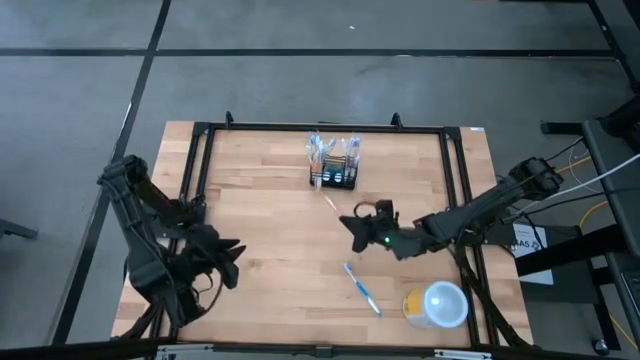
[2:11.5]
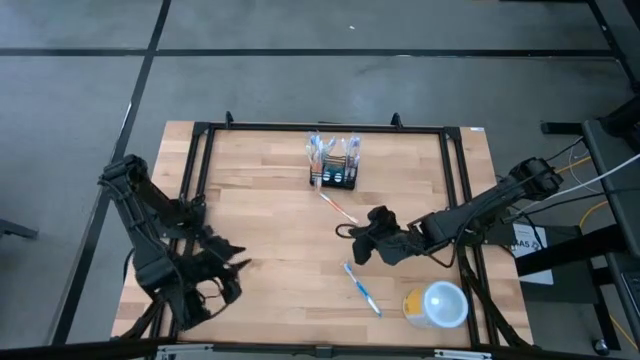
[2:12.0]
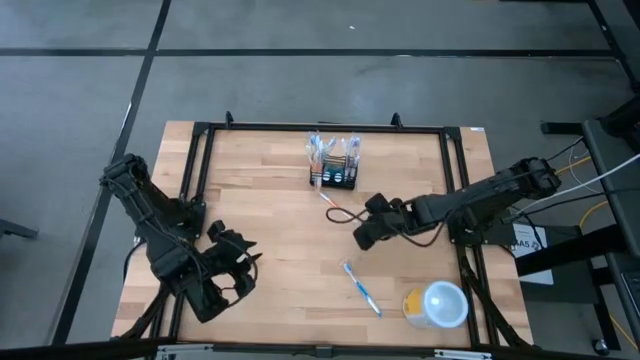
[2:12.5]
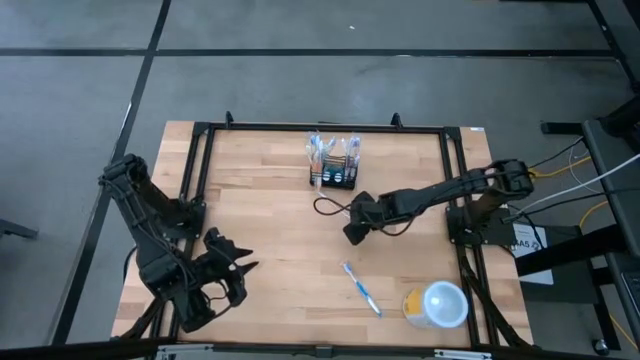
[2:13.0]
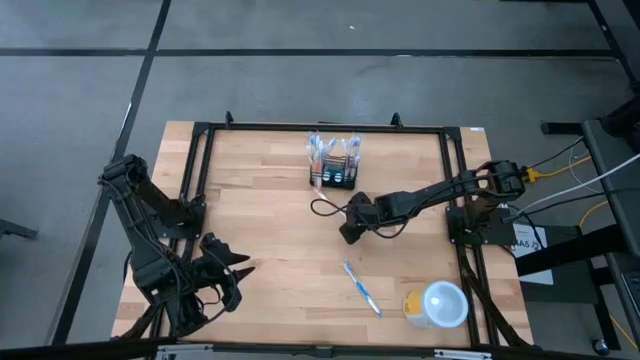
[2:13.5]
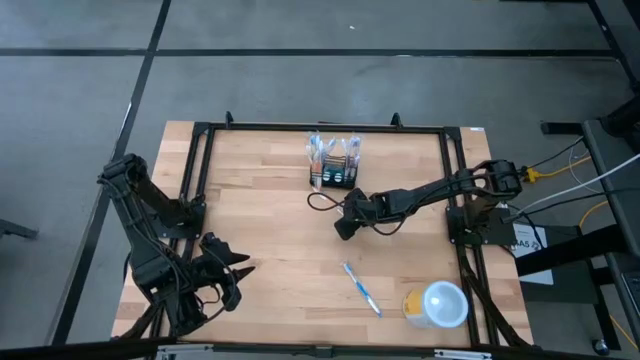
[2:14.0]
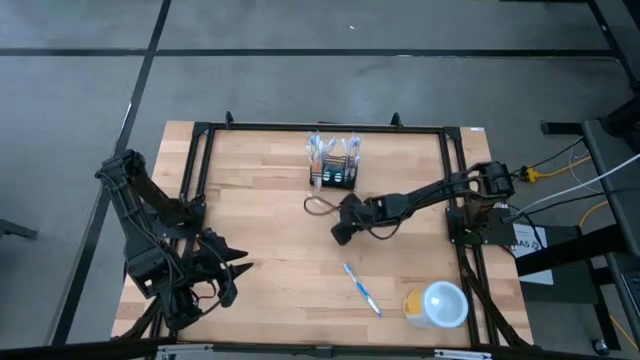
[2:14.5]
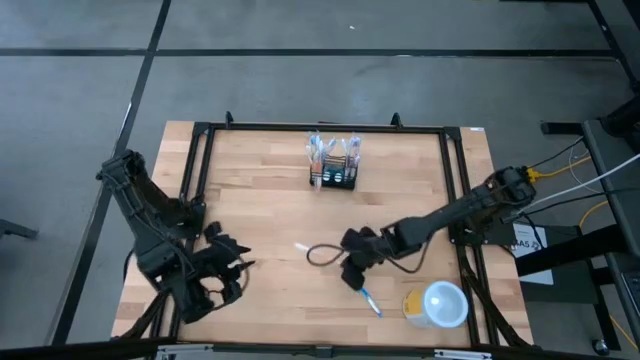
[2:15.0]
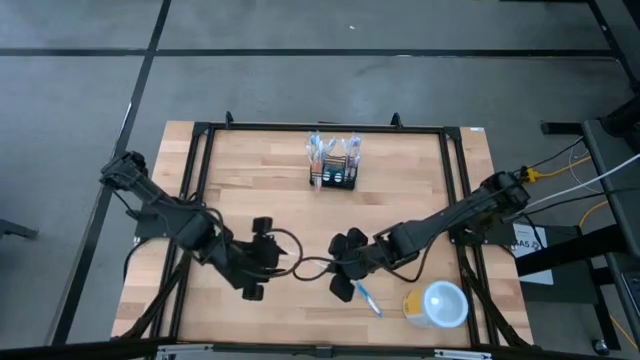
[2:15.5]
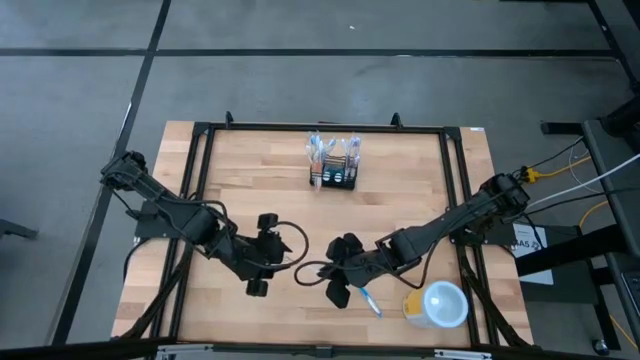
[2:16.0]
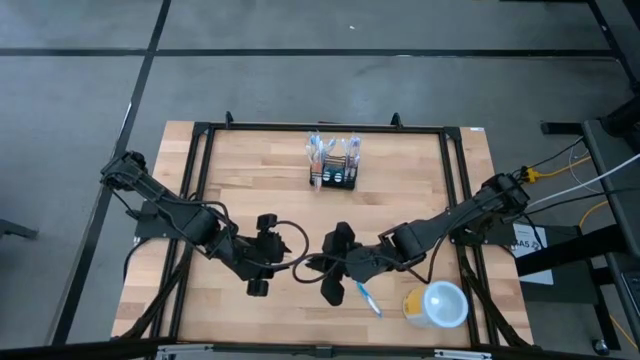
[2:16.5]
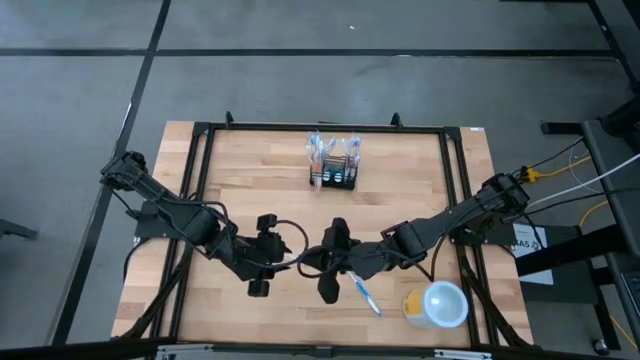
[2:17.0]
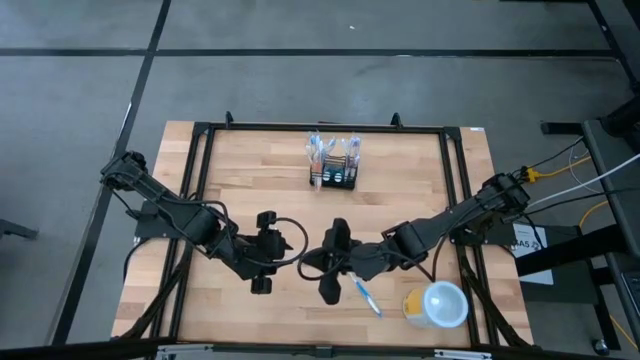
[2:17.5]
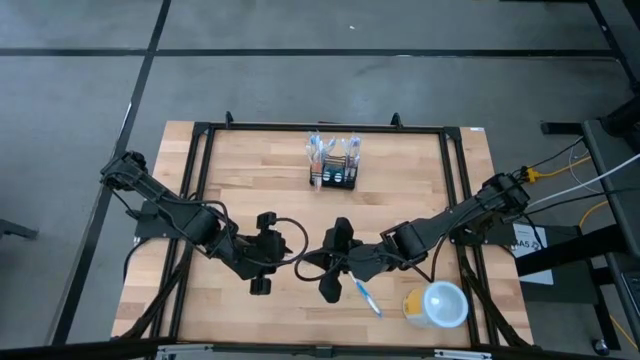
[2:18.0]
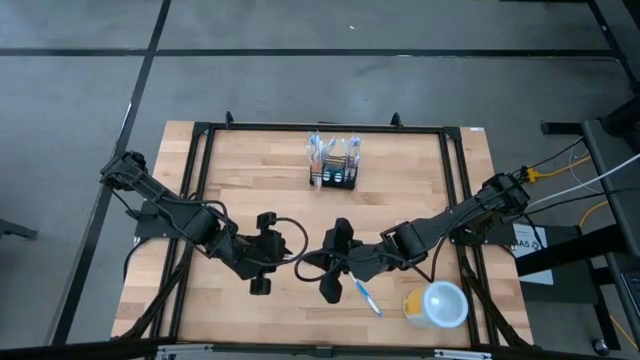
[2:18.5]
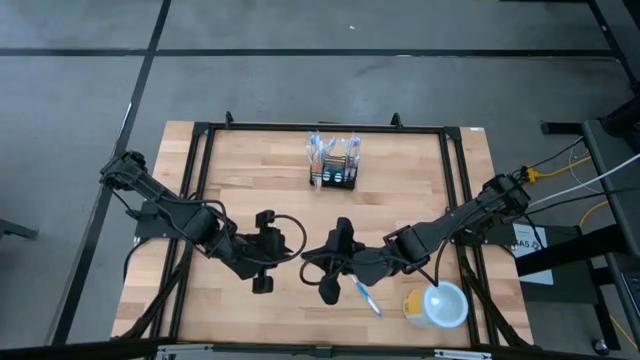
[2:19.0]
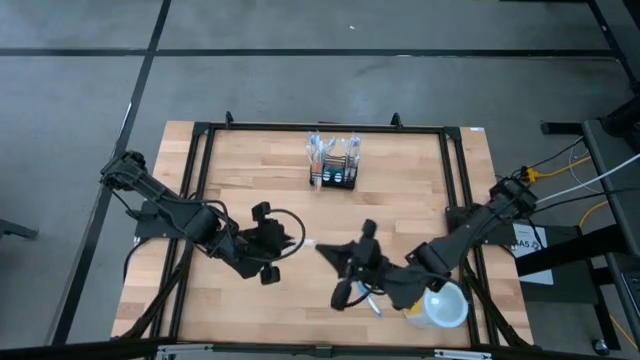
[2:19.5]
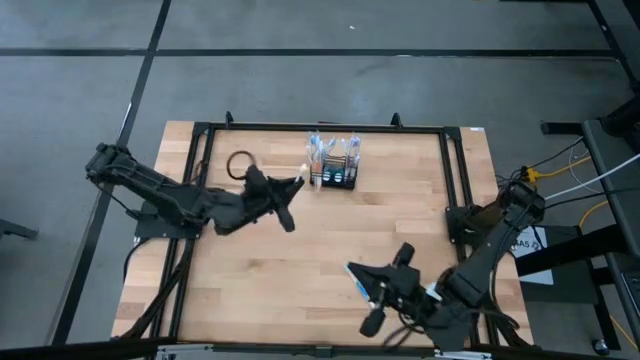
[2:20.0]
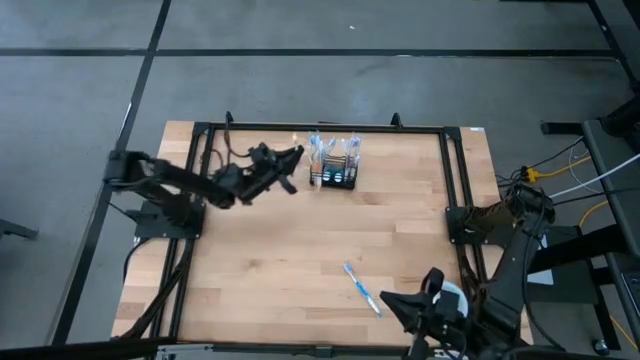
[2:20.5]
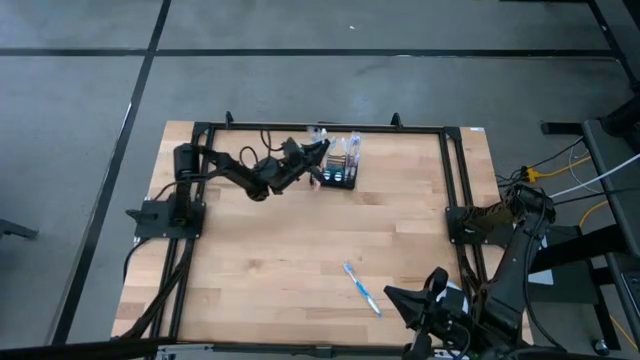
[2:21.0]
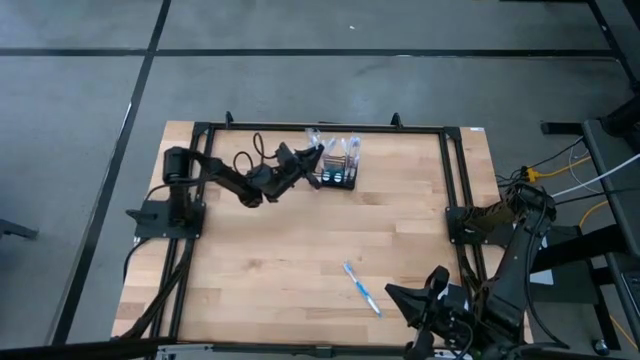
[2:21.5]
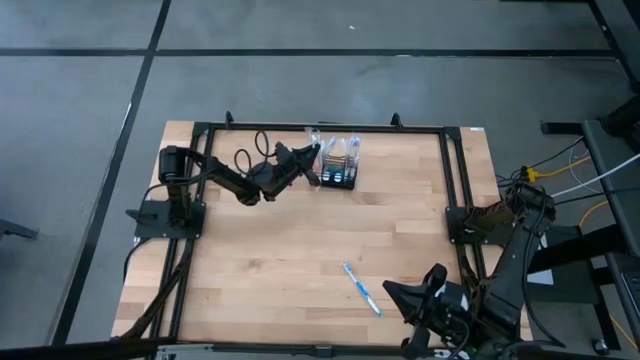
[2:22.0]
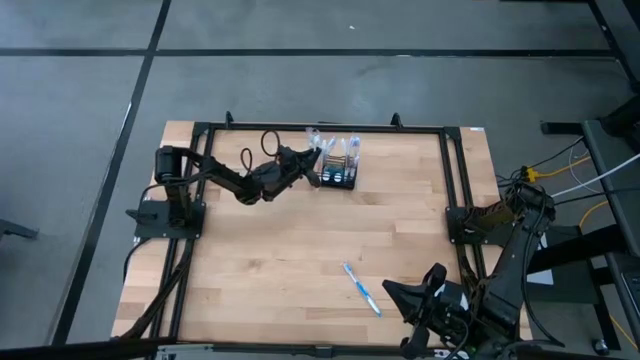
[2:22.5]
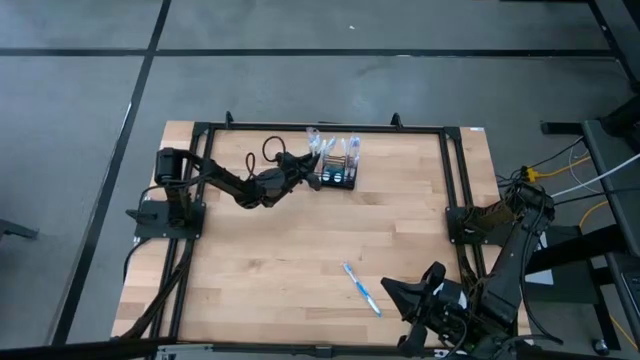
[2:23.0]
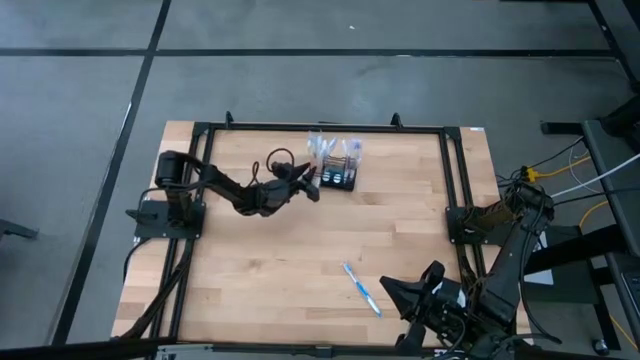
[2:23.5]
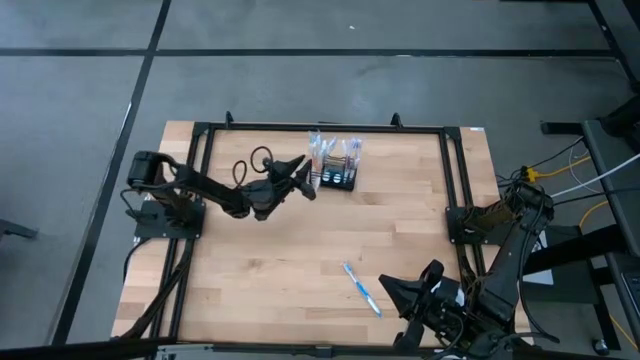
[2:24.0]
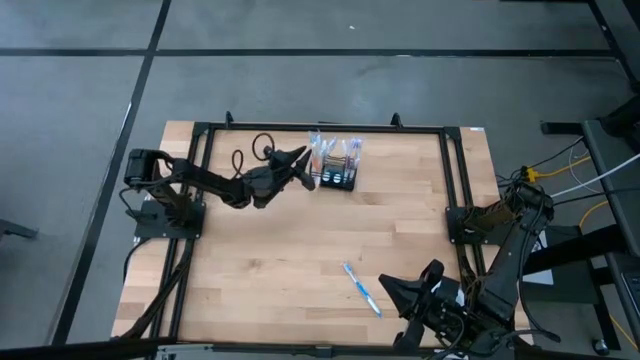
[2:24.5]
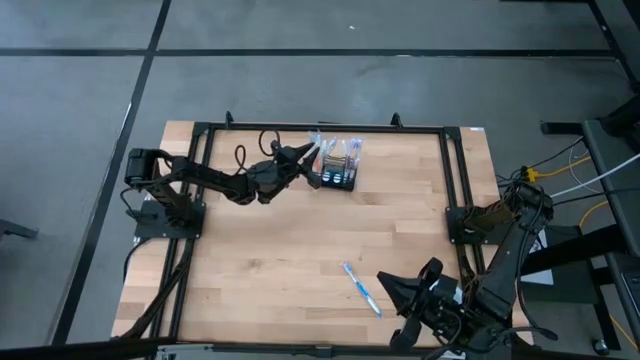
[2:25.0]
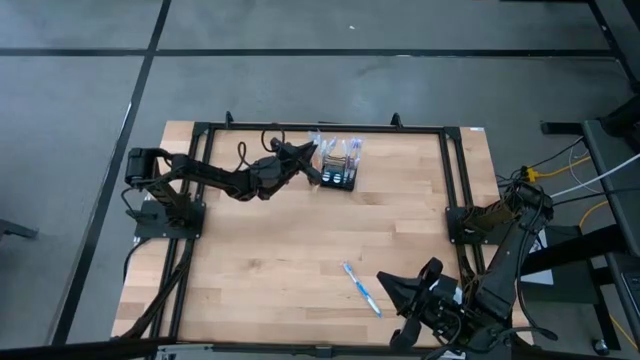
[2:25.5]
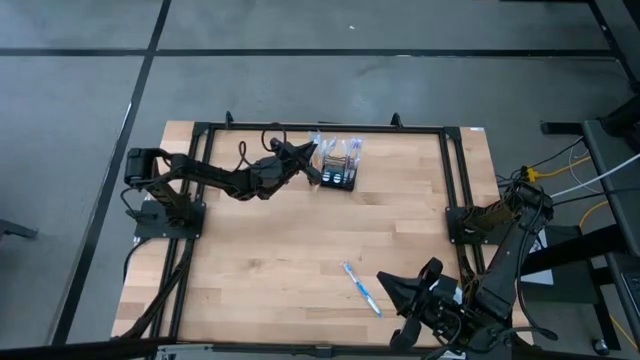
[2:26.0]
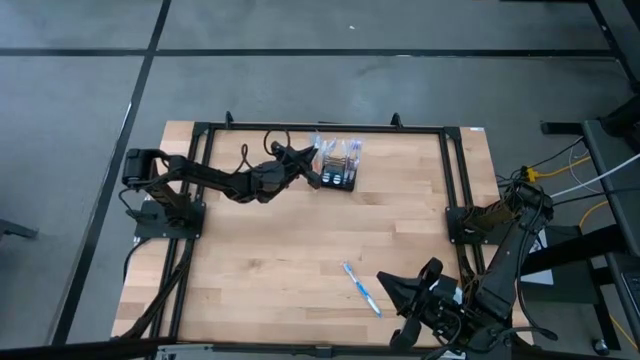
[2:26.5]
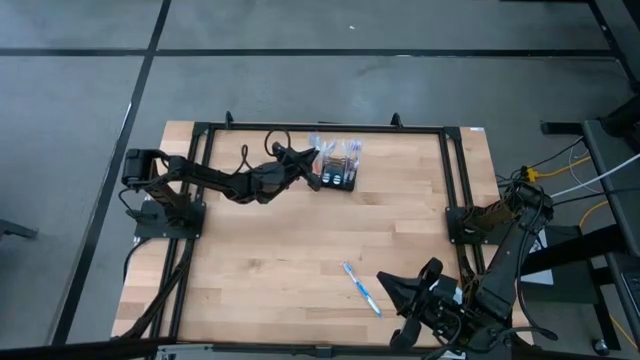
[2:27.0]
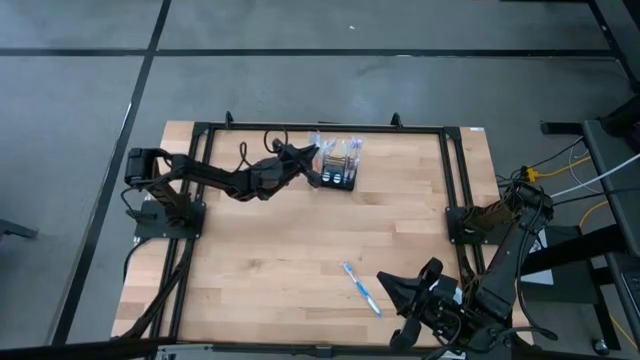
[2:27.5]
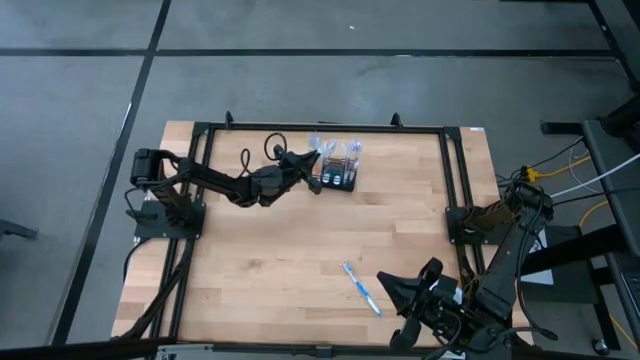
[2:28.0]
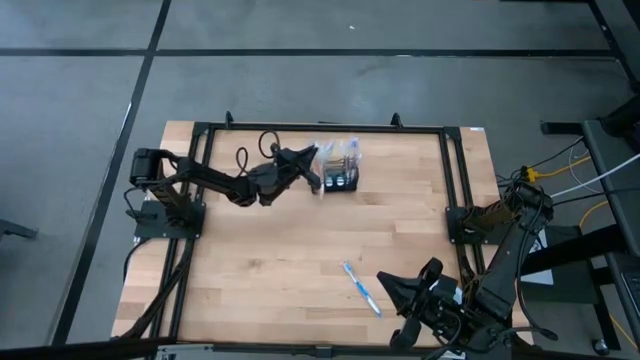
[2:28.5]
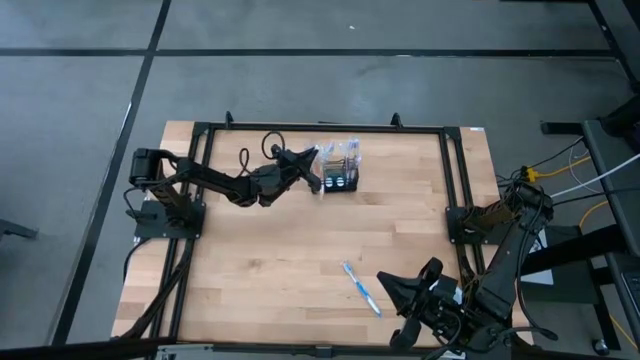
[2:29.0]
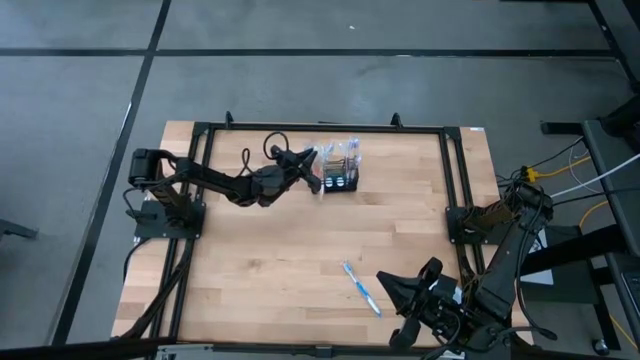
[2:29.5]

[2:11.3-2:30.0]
Task: Pick & Place toothbrushing station
Put the orange toothbrush into the left section of the mesh organizer

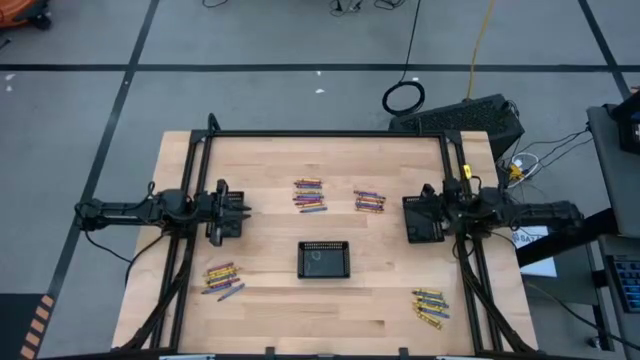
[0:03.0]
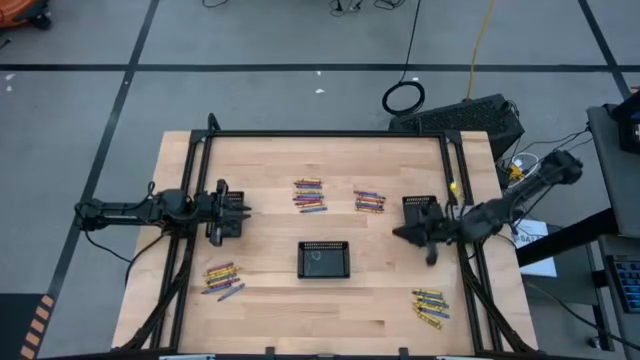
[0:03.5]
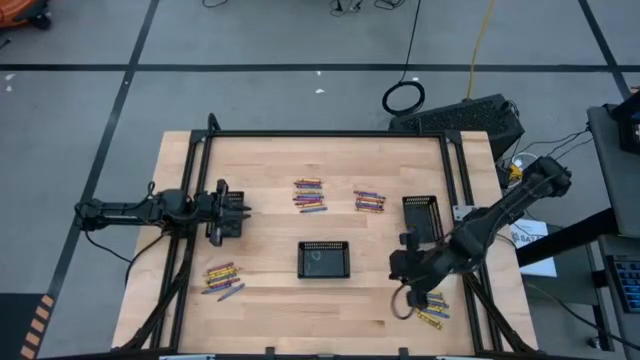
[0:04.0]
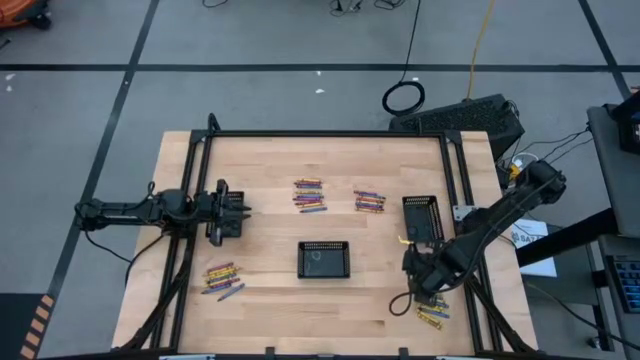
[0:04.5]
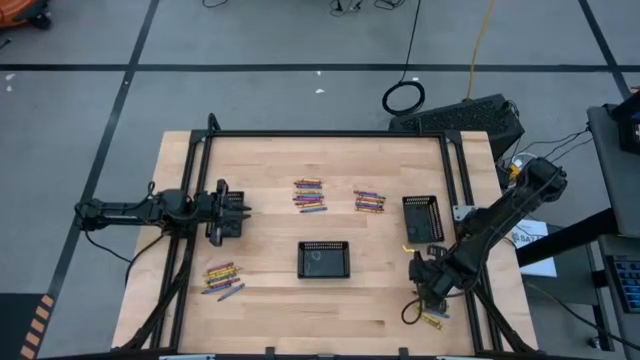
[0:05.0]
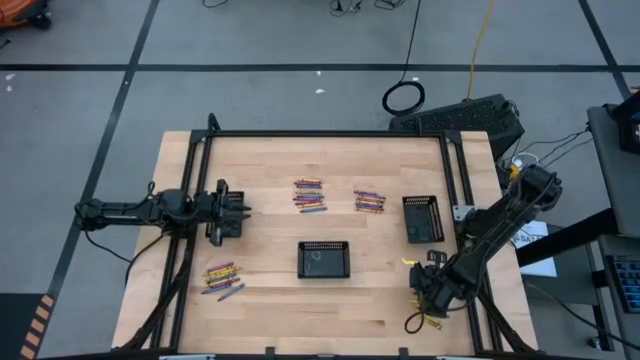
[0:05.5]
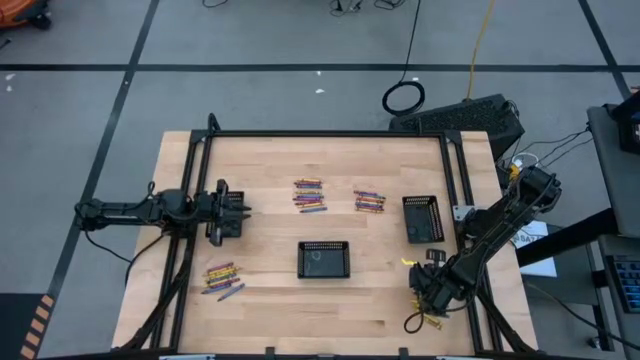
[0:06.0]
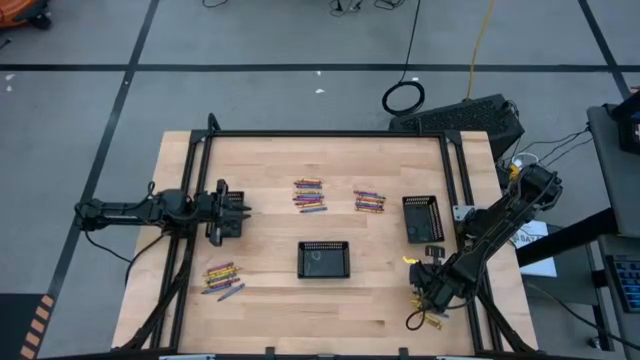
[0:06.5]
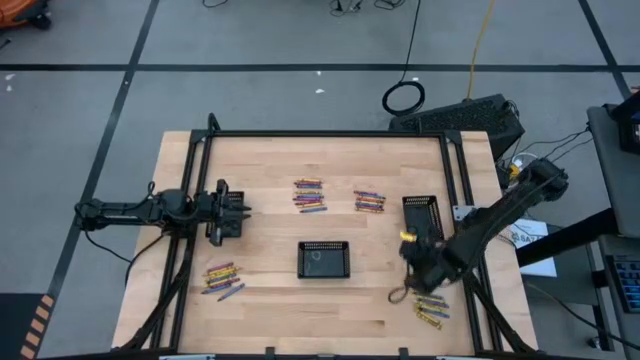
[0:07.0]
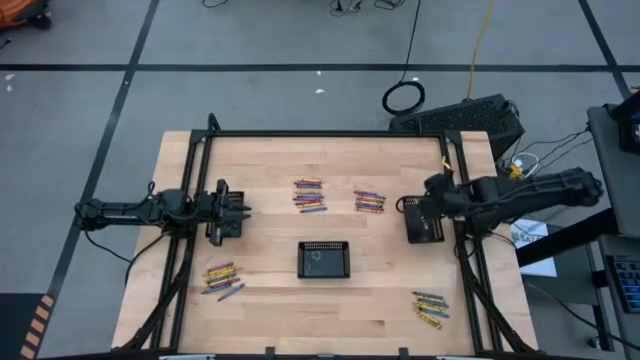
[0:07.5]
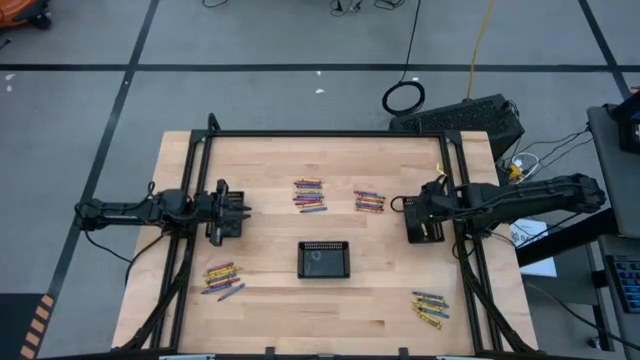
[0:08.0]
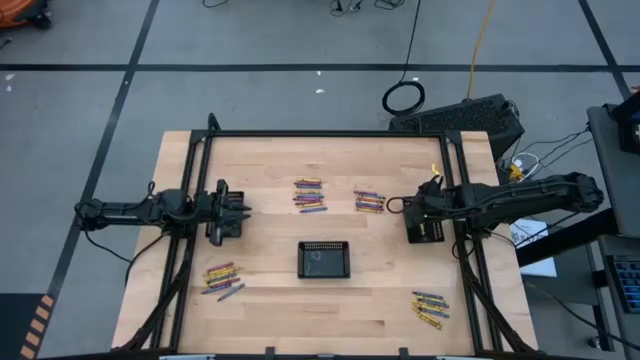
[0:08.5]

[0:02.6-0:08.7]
Task: Sort crayons
Put the yellow crayon into the right black basket
